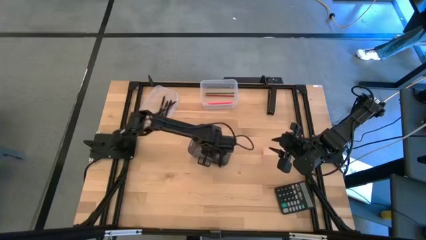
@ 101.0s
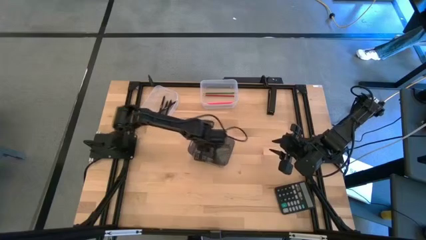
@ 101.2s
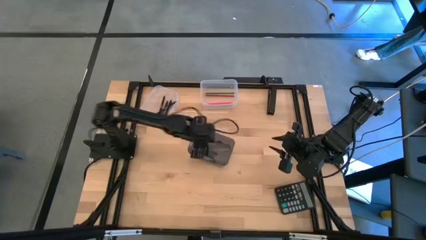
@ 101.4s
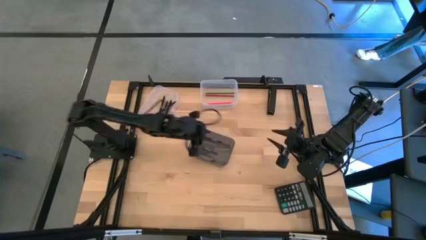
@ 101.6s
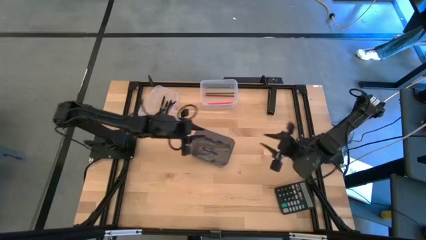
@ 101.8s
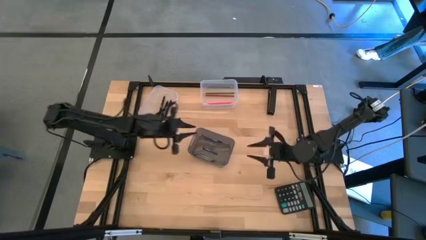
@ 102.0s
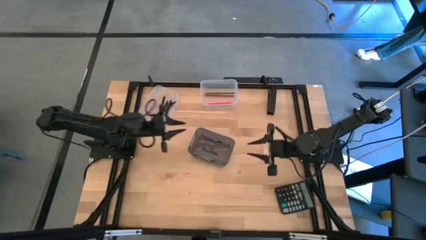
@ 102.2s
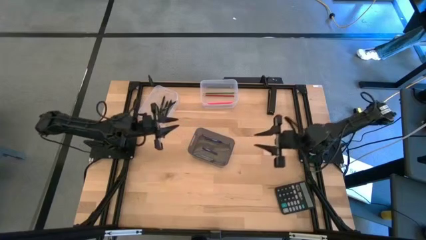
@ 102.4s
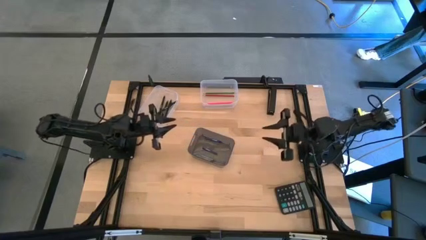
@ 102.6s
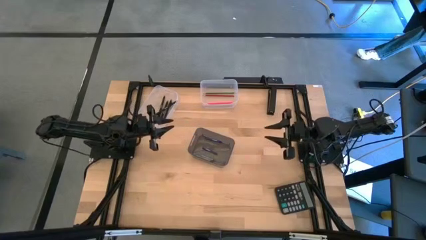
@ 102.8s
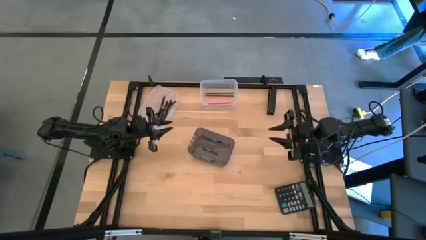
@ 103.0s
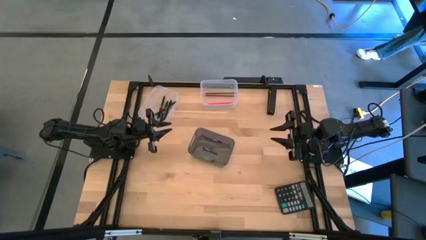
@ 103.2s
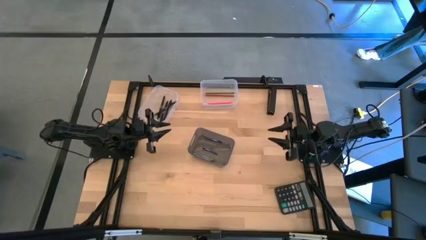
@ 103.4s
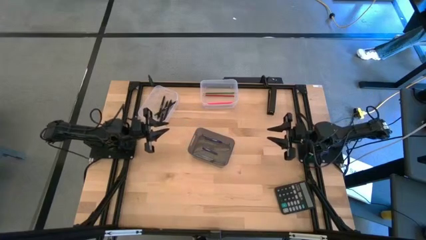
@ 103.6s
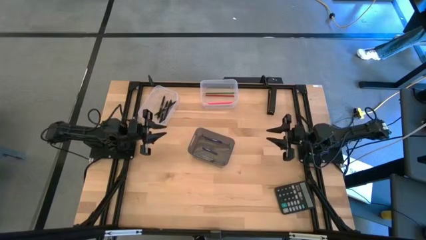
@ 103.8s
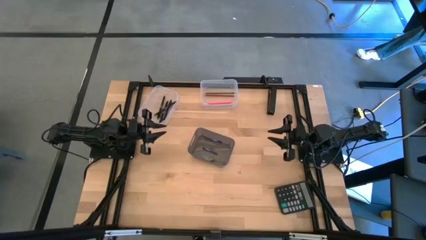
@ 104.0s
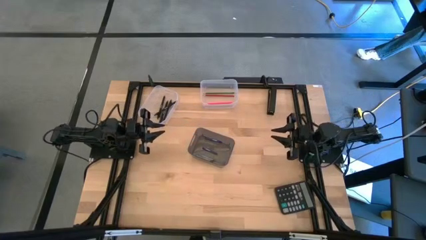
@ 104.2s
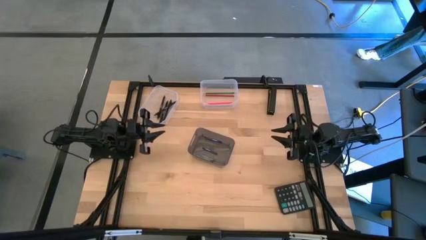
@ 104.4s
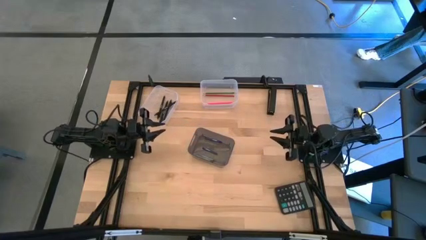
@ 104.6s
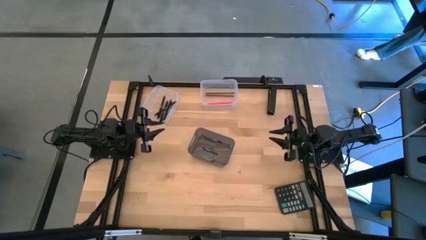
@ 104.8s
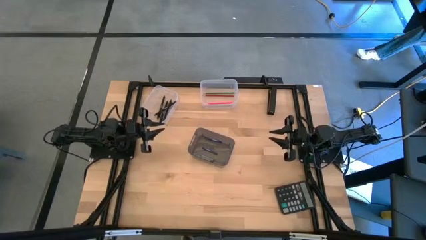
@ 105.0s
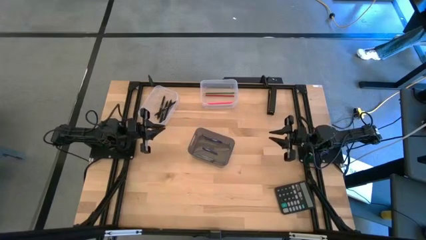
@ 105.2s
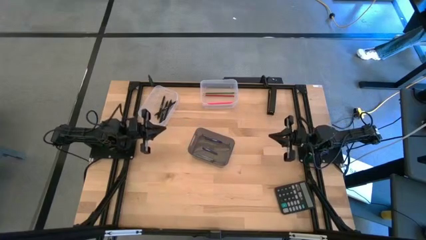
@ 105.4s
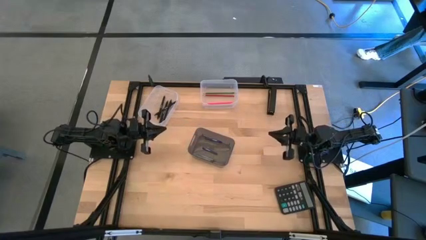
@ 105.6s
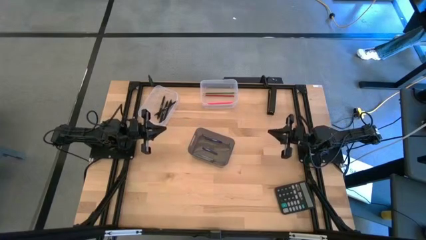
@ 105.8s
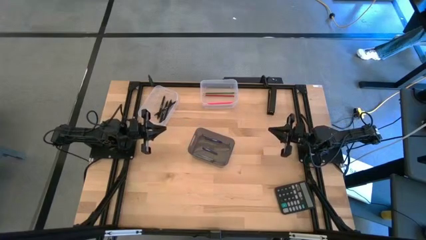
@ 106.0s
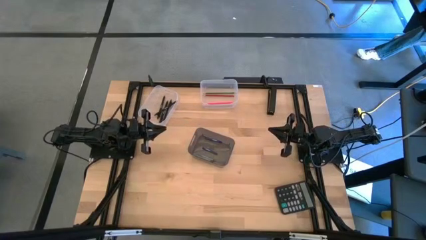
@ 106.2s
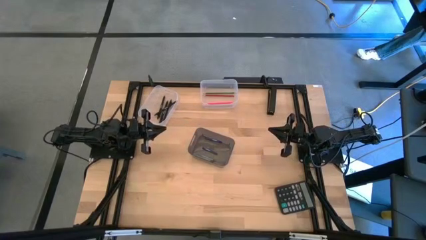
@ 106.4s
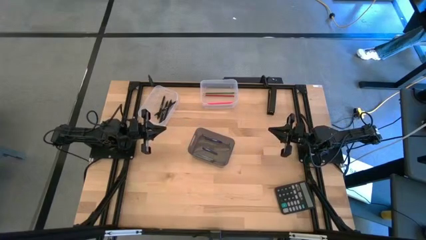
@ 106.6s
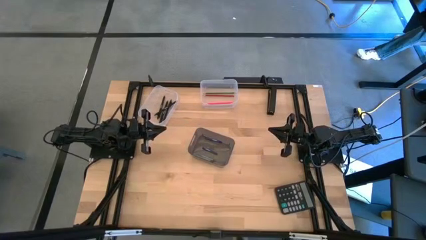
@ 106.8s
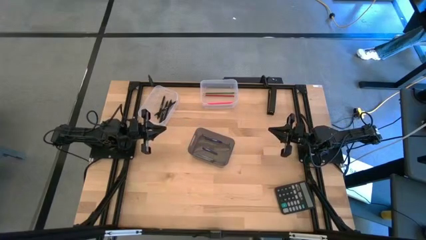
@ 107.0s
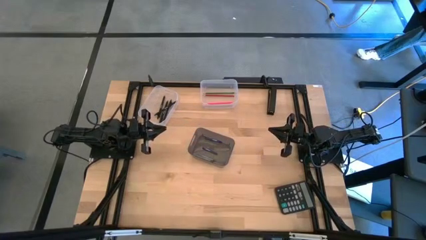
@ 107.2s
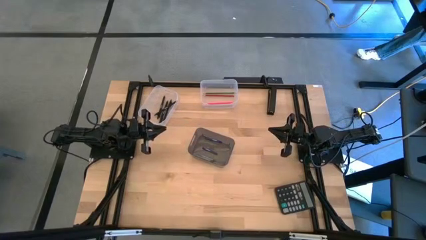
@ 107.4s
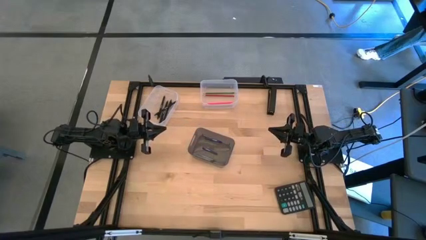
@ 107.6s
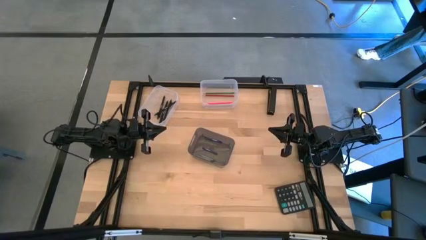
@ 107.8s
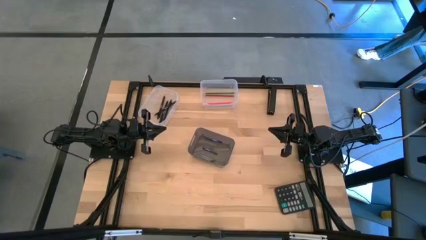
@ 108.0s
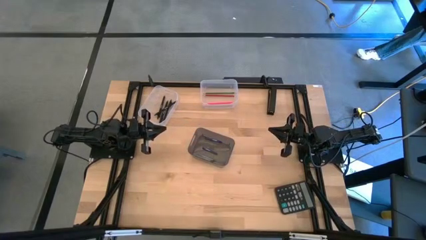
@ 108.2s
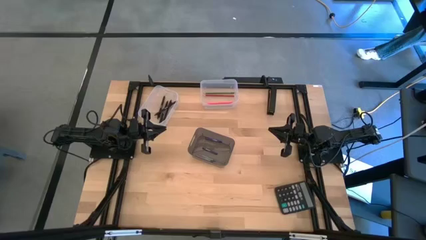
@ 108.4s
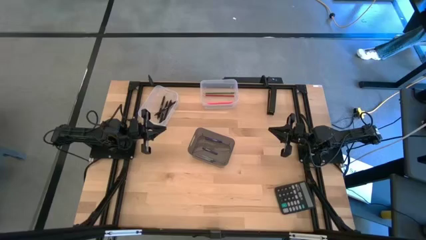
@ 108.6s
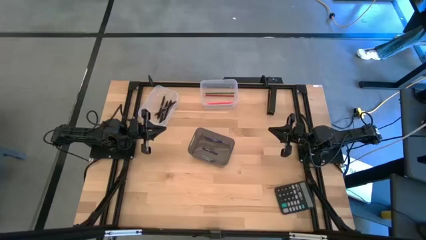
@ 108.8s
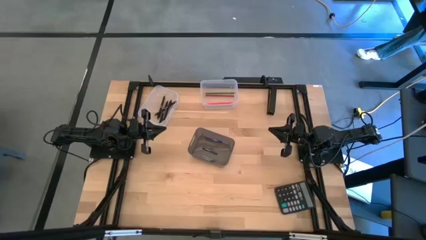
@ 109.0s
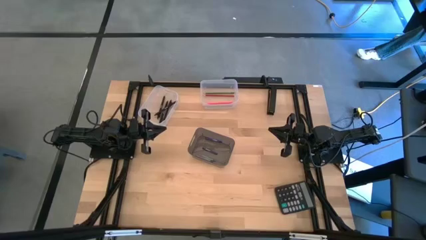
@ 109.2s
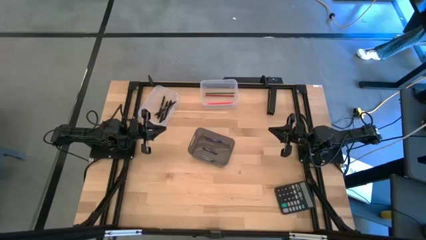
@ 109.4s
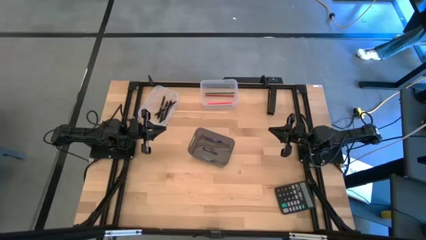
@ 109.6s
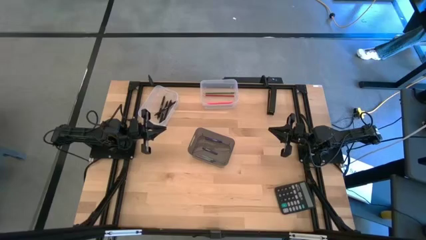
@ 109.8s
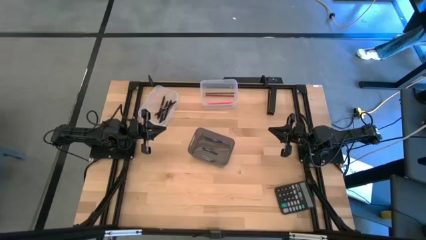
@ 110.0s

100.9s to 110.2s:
Task: Sort crayons/erasers/pens/pencils in bins
Return to Home Position

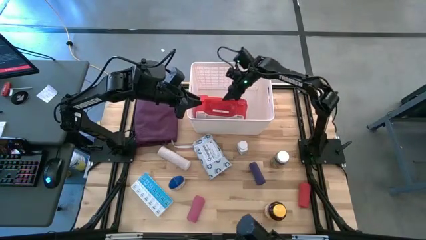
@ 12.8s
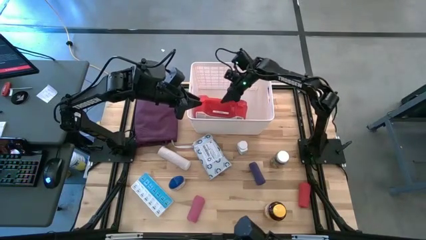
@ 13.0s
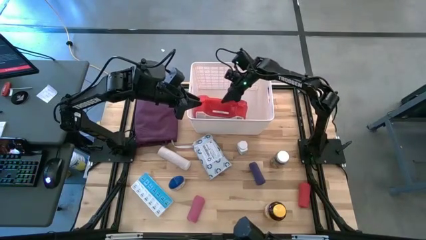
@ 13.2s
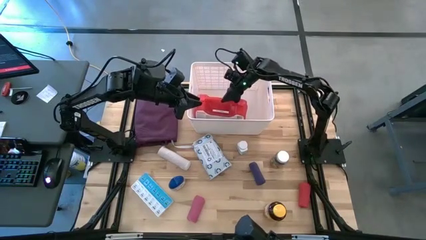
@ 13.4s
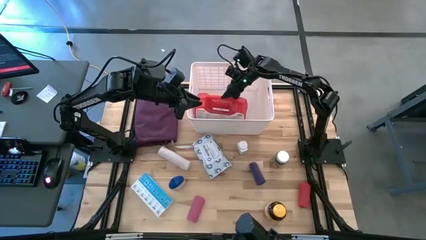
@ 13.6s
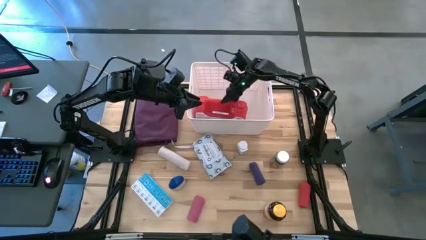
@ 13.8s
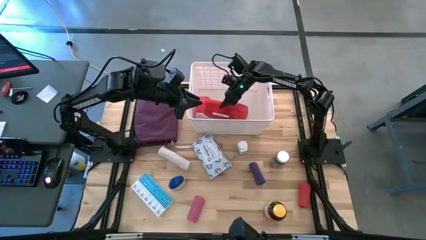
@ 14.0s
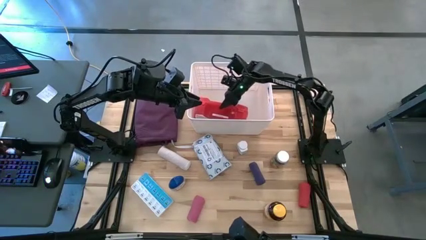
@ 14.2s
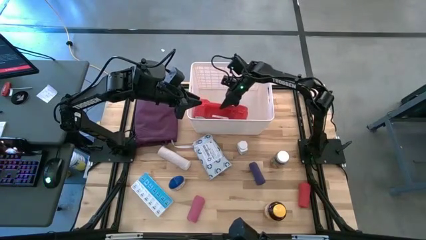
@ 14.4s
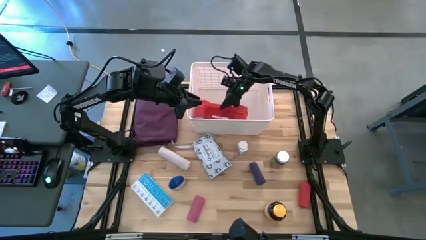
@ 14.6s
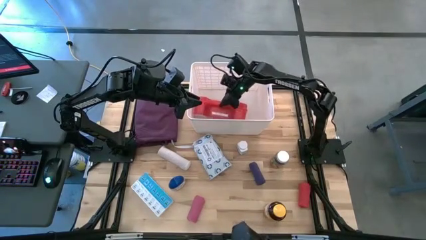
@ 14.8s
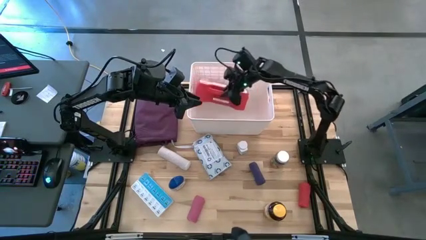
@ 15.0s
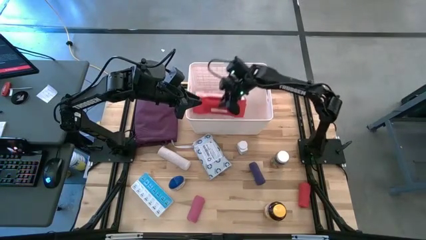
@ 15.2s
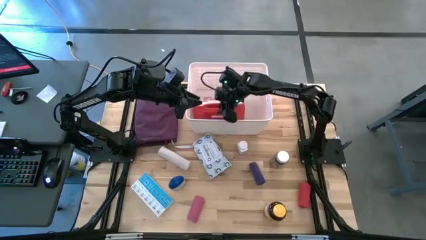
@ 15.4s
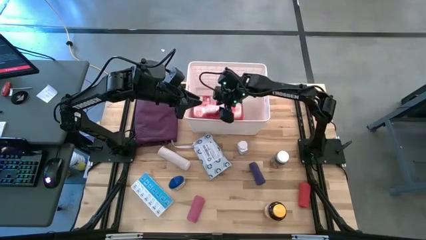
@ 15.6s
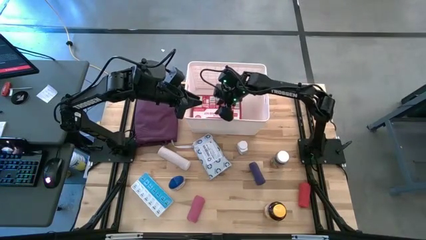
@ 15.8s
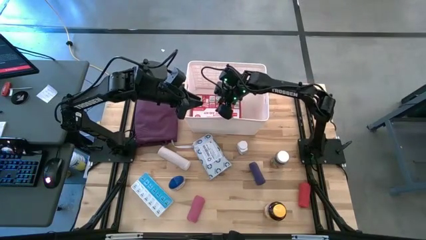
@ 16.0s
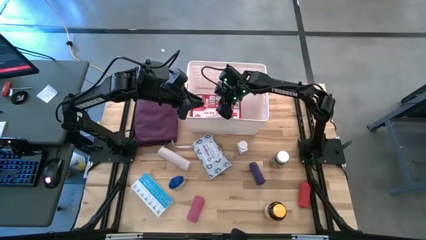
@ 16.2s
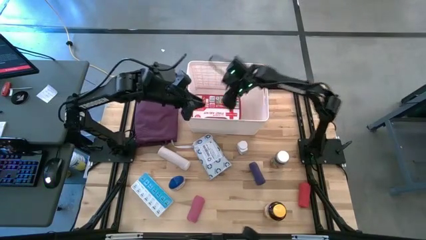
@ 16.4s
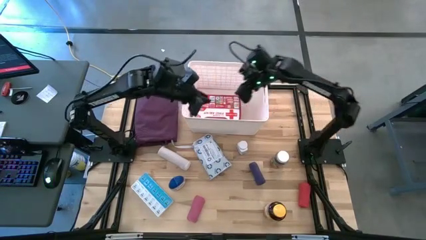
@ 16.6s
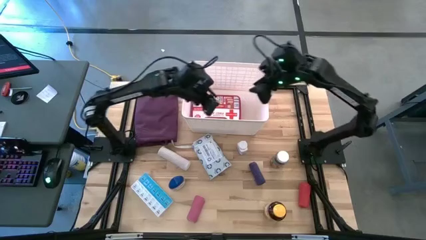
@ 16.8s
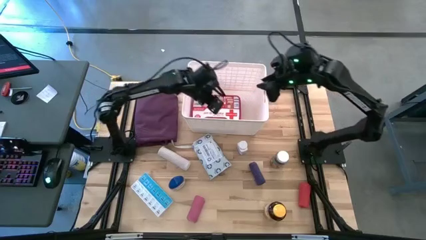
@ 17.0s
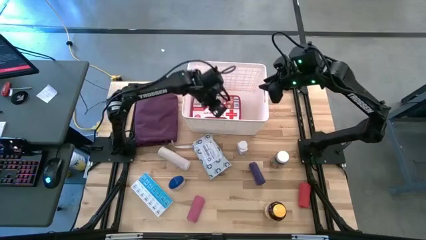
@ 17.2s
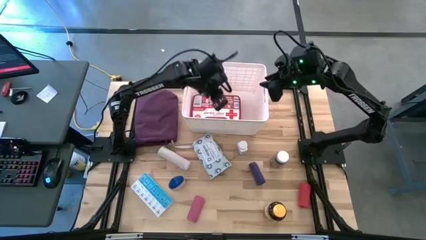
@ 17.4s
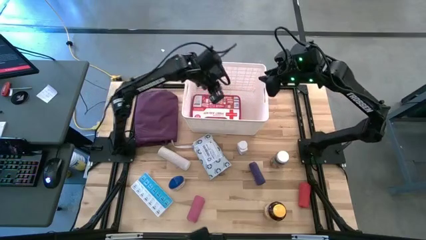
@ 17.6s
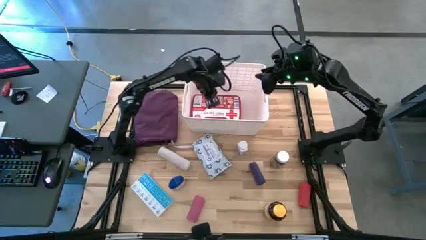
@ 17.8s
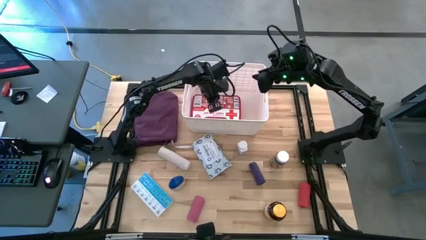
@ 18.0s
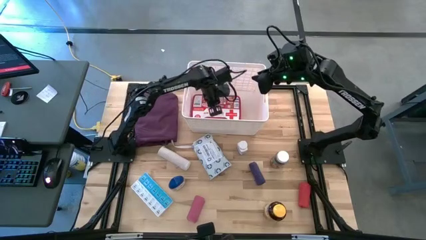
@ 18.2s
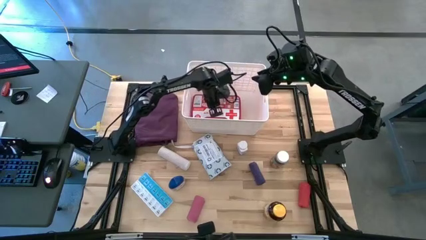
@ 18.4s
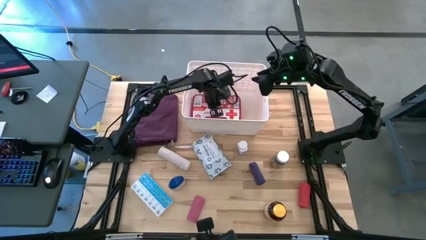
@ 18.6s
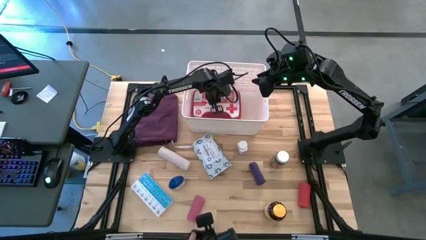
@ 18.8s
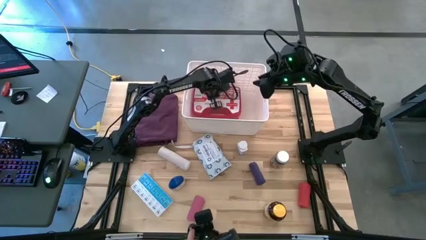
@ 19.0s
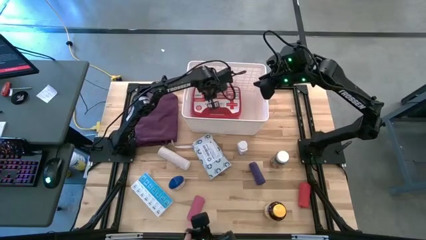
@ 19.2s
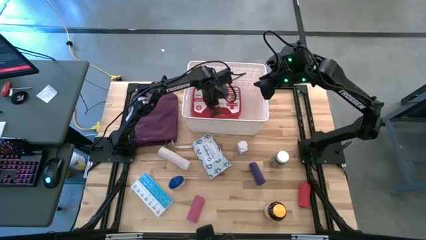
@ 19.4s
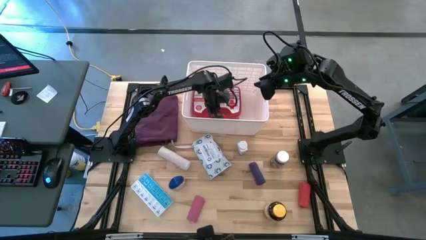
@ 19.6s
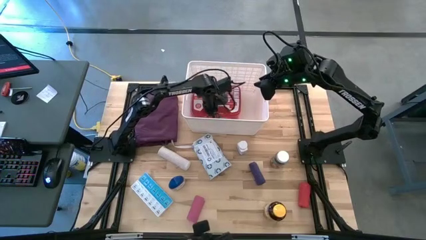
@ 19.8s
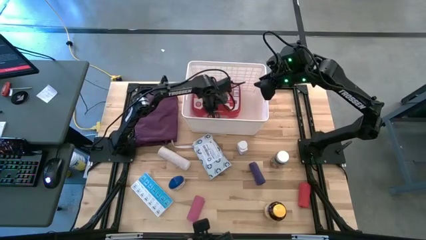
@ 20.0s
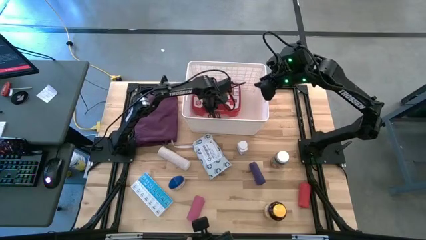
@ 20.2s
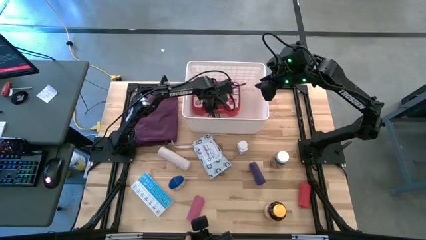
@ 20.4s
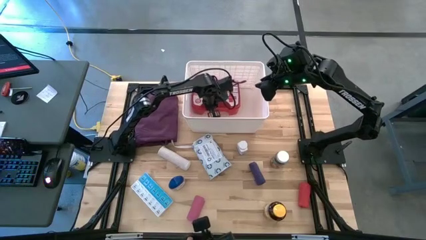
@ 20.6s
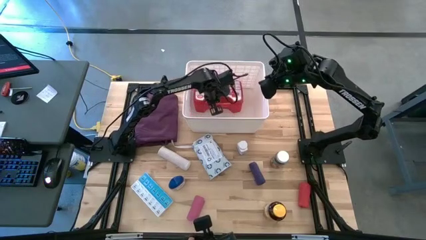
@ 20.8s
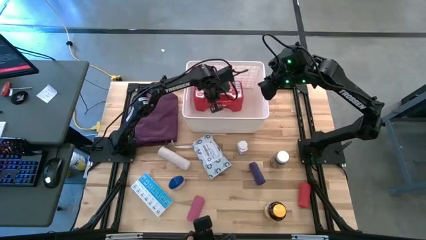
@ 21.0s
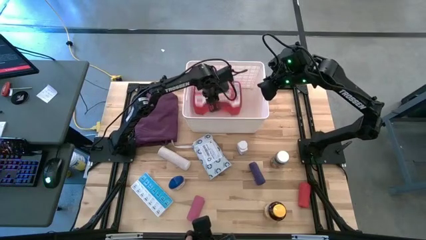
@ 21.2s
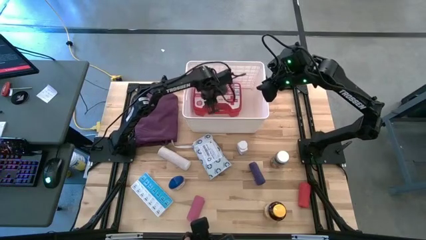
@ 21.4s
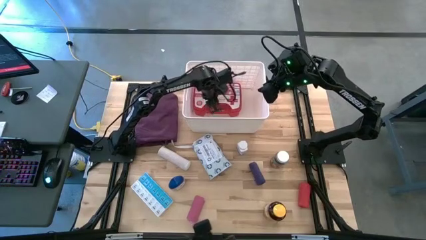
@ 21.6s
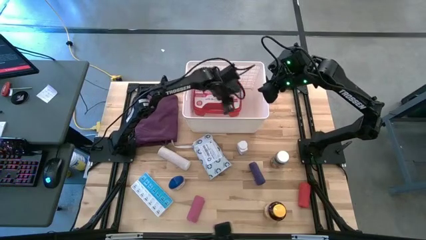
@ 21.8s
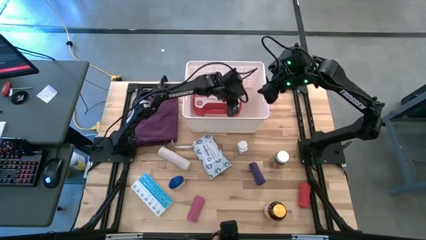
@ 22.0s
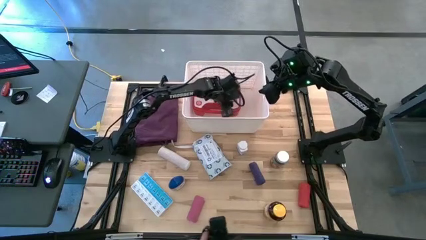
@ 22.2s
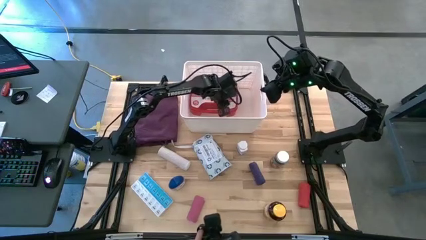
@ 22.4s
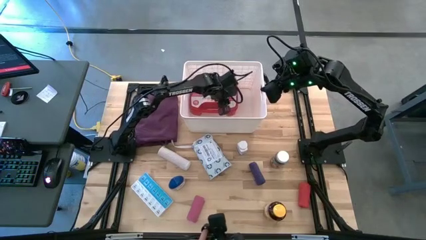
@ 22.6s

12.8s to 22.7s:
Task: Pick & place medical supplies in basket/bin
Put the red first aid kit into the white bin
